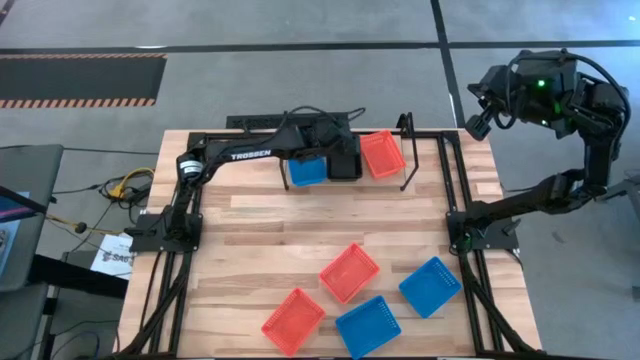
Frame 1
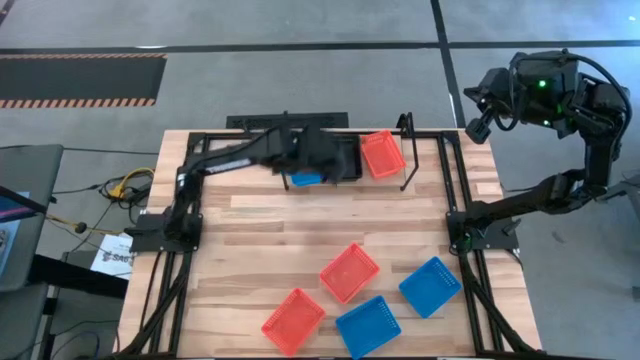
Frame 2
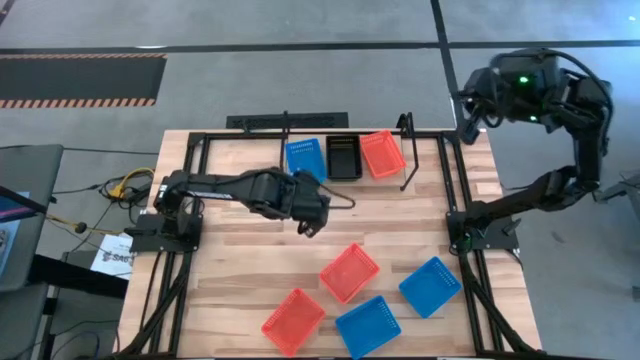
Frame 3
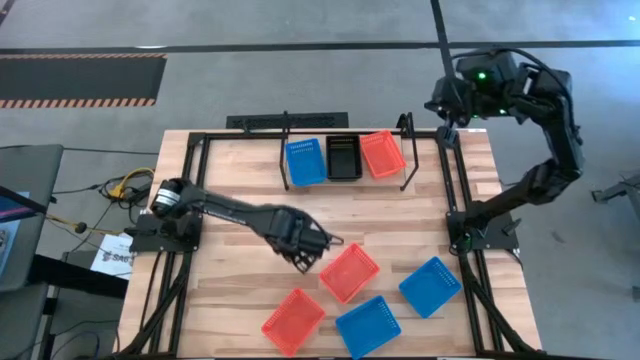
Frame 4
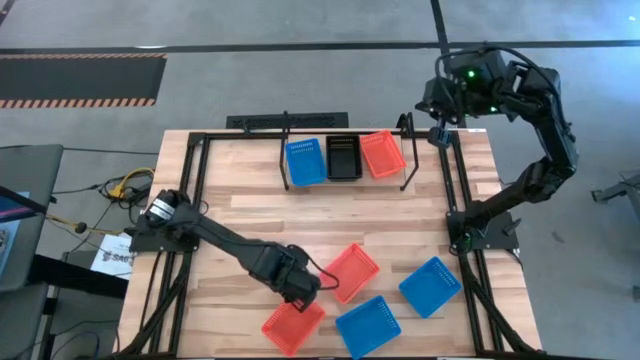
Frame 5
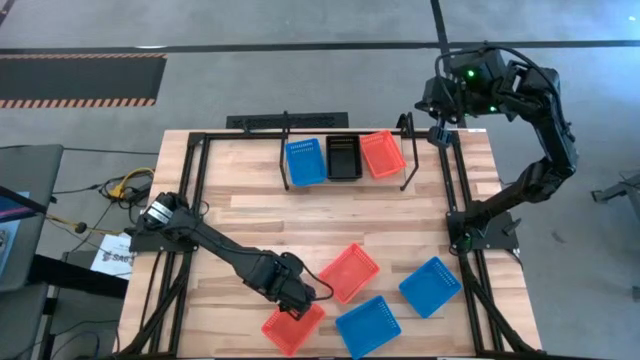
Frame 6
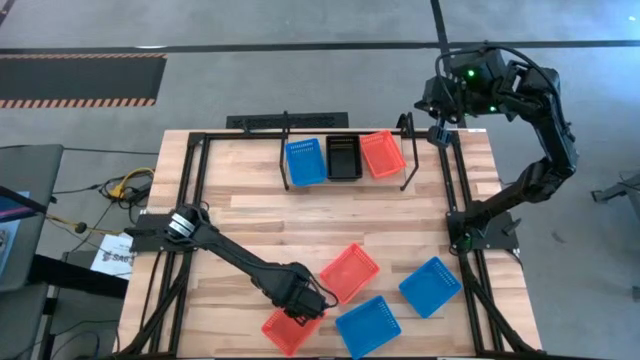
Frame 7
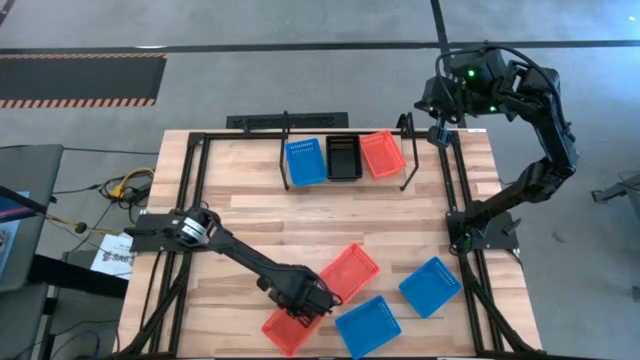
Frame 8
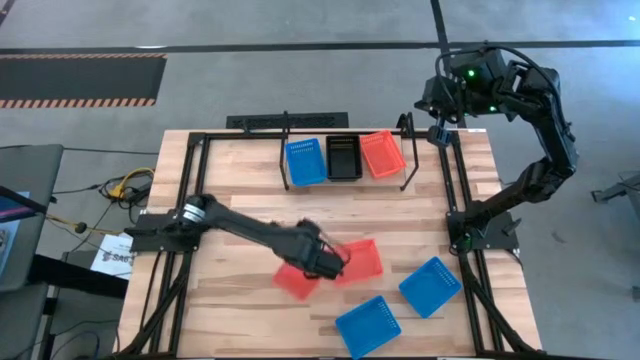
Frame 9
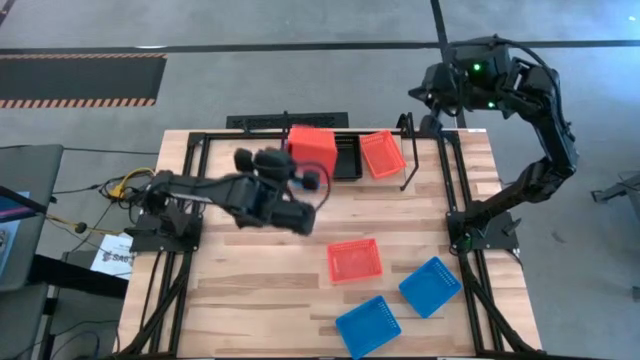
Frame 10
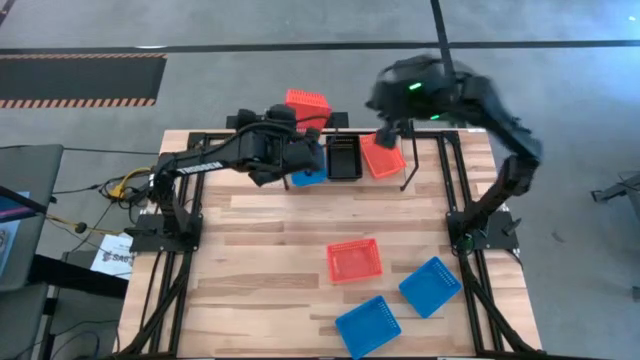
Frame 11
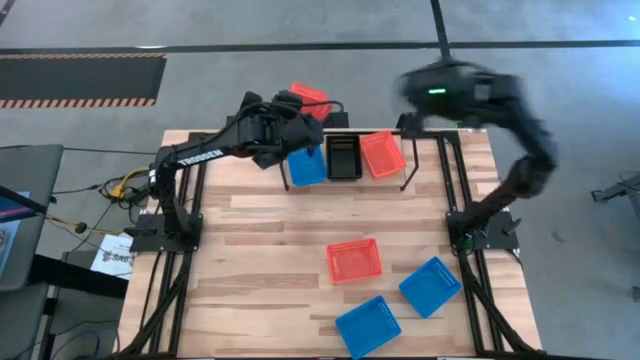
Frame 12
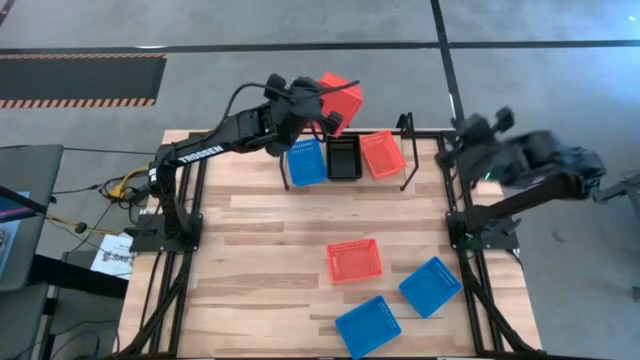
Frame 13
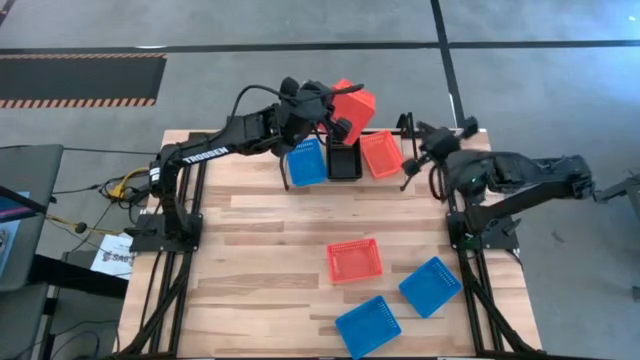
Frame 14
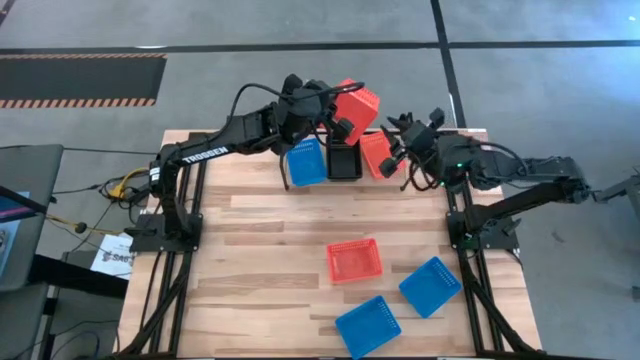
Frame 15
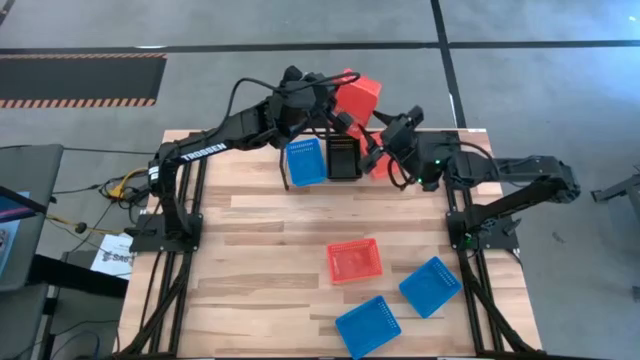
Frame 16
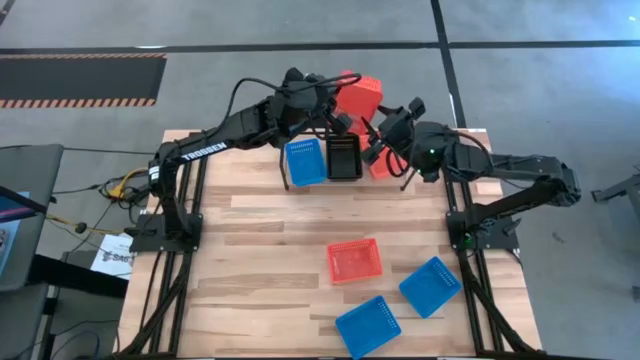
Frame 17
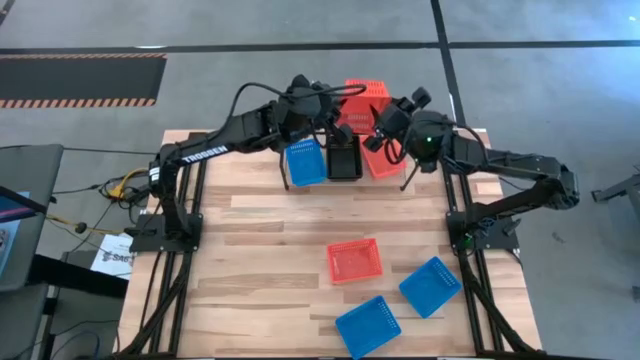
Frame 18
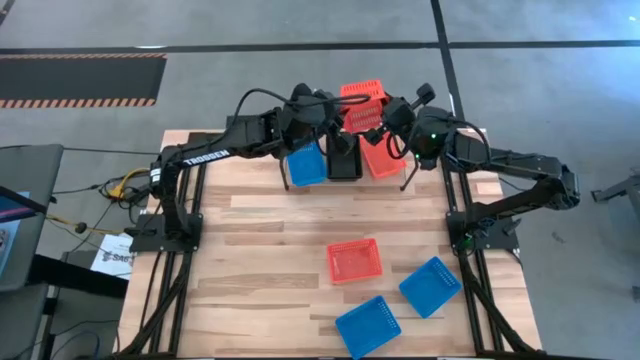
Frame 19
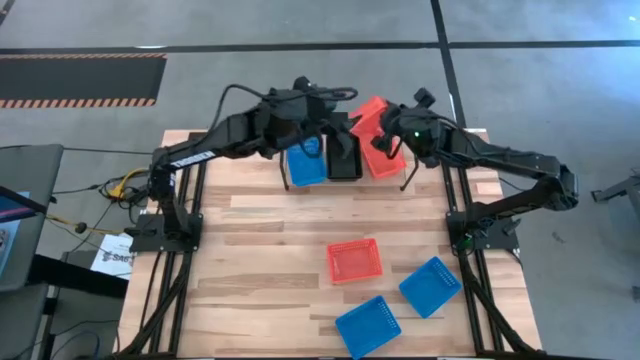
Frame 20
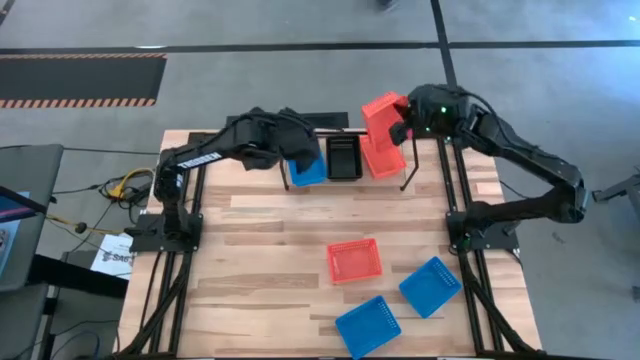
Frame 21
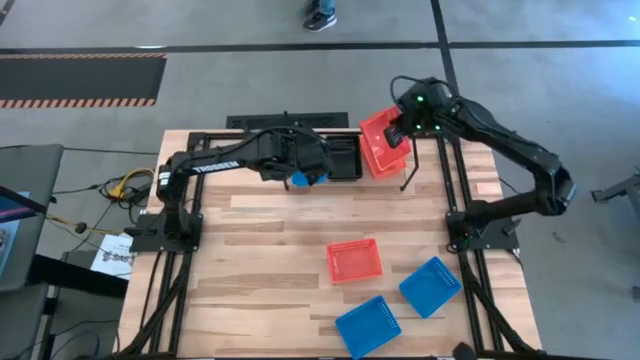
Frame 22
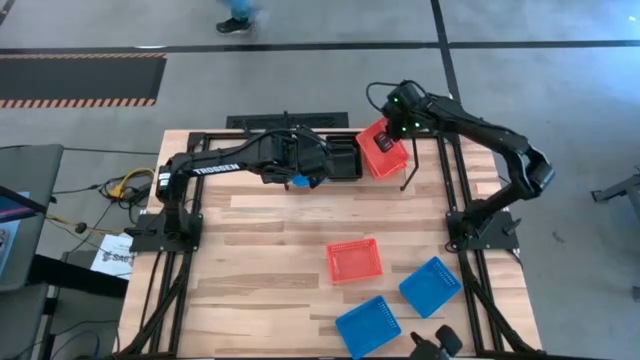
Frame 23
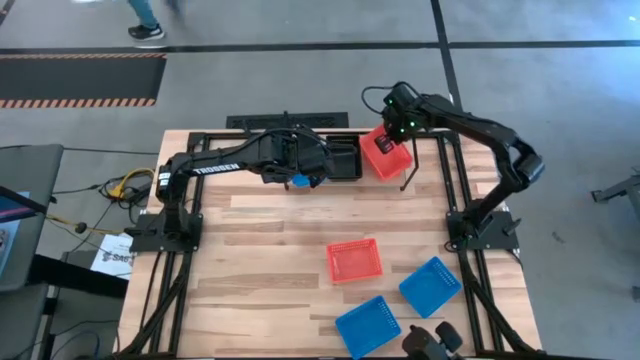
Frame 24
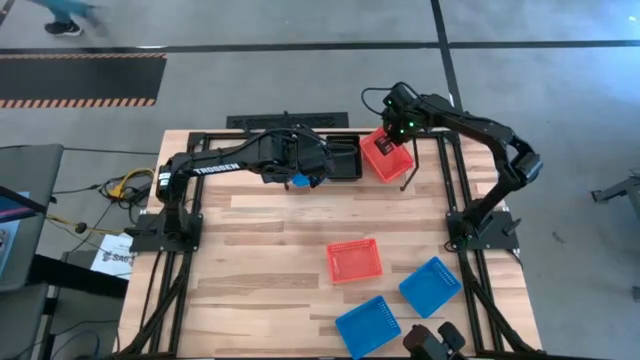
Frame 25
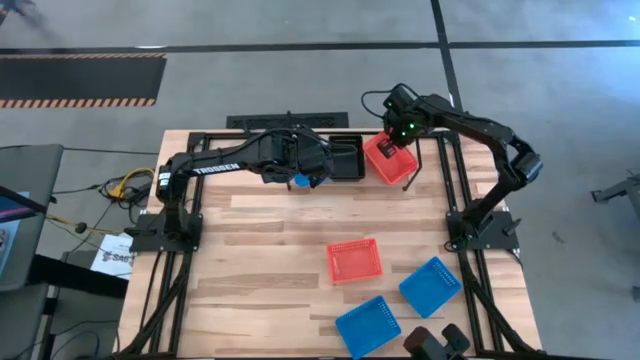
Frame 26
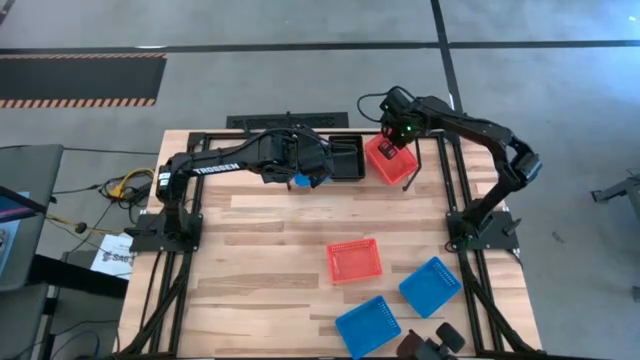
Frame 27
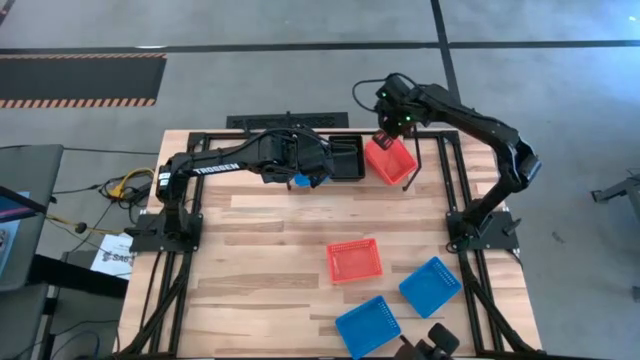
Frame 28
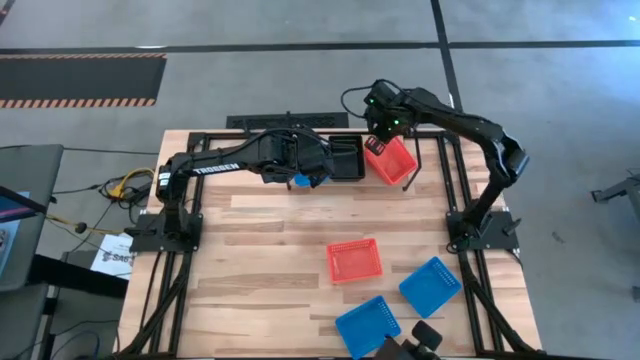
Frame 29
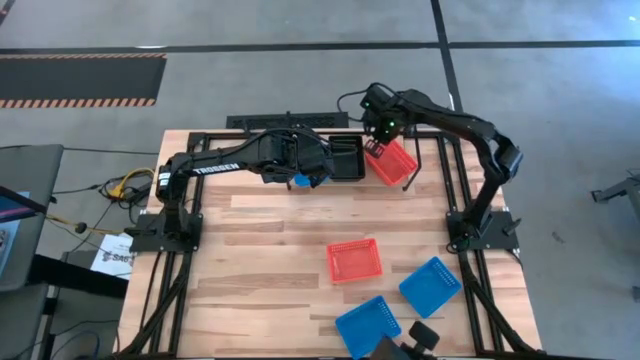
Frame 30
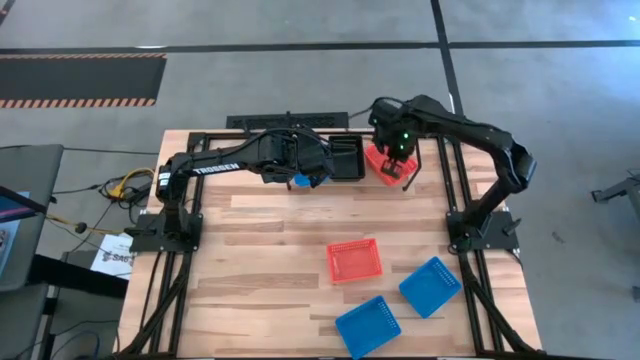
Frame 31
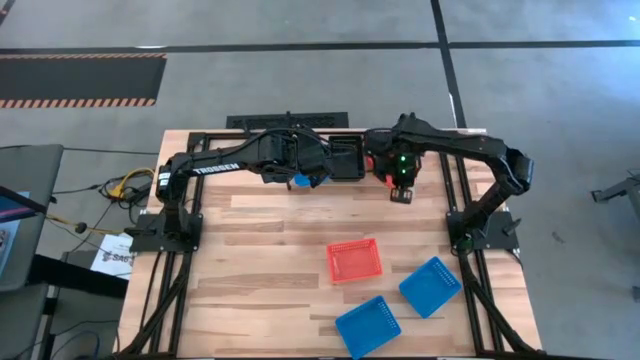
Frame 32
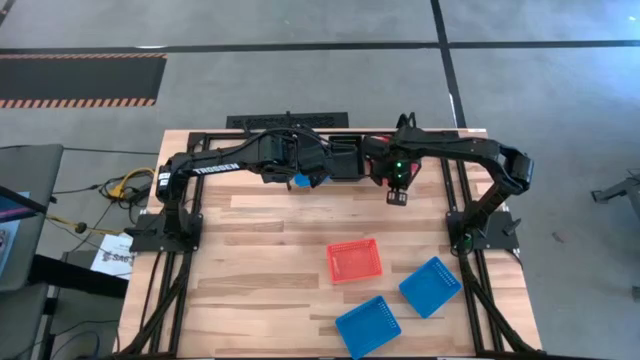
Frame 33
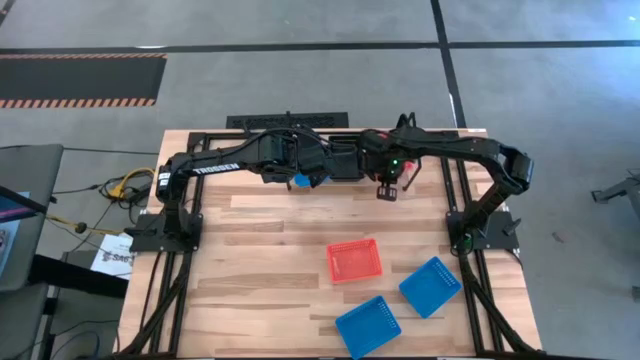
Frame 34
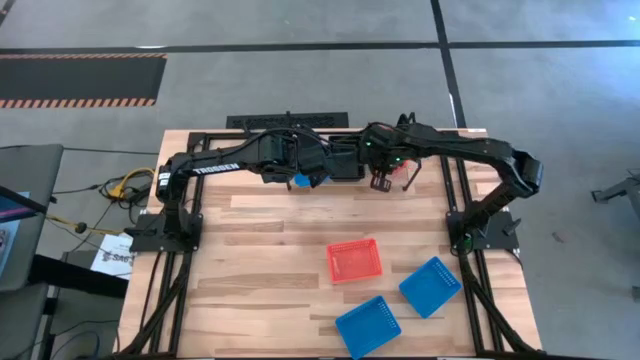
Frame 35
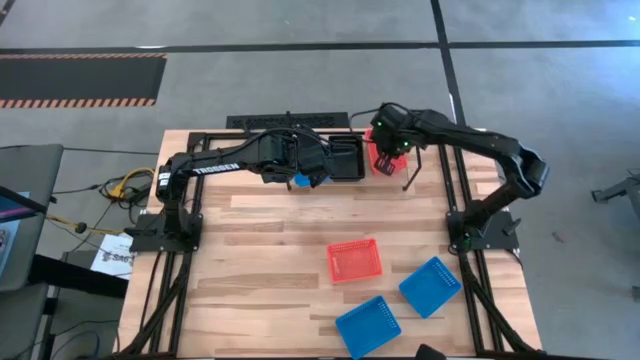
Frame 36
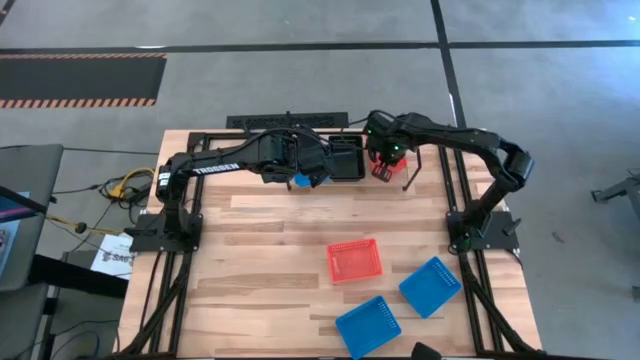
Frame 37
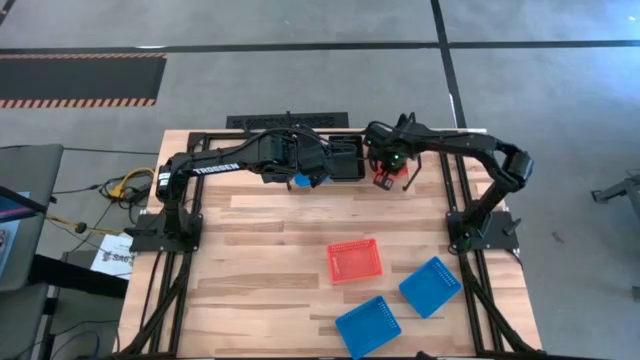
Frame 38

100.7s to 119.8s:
Task: Stack baskets on shelf by color
Stack the bottom orange bin on top of the orange bin on the shelf

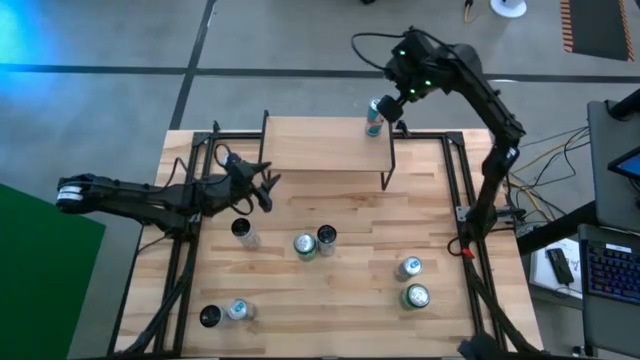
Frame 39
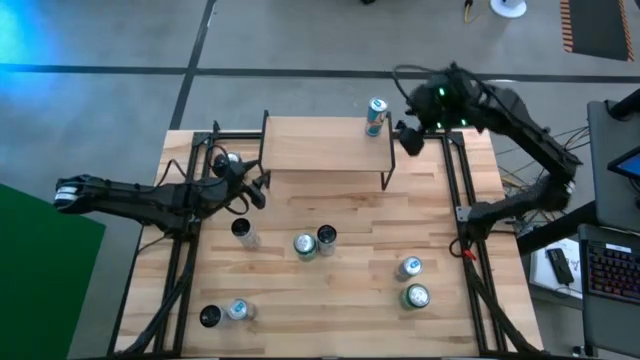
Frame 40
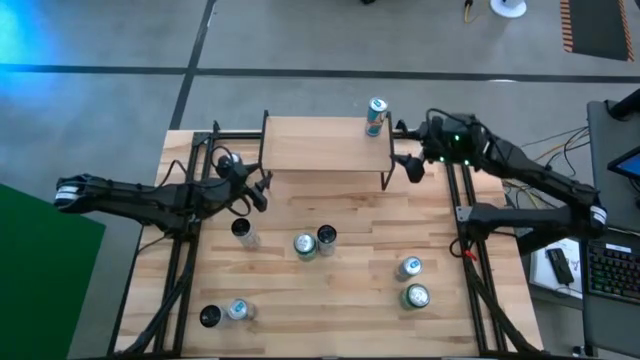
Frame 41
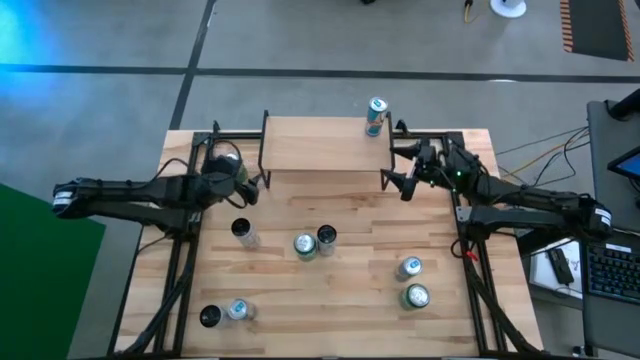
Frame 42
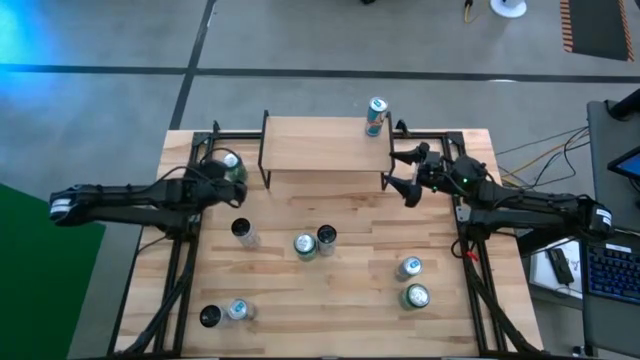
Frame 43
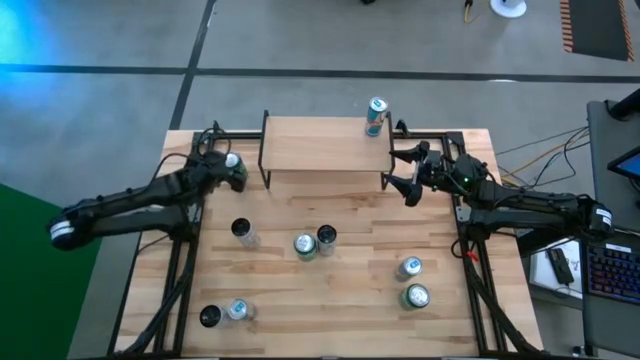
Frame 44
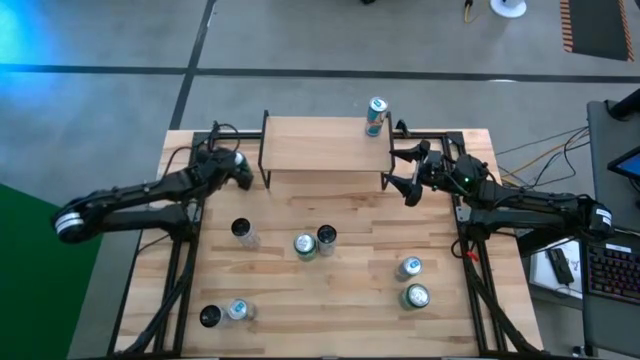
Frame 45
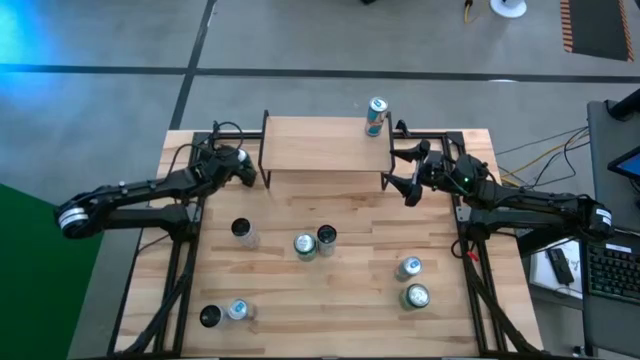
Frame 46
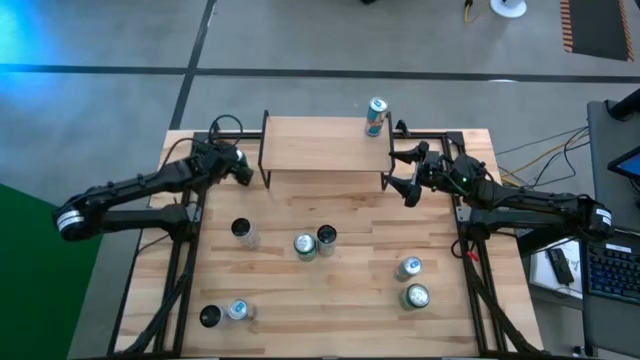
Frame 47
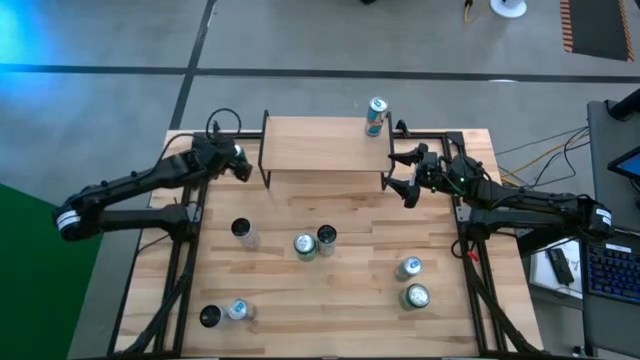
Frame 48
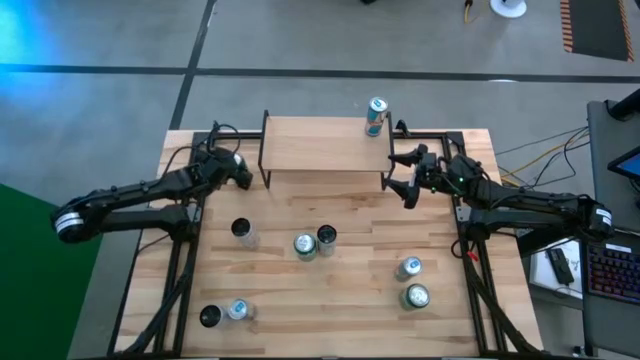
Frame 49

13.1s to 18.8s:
Task: Sort soda cans
Put the top green soda can on the shelf
